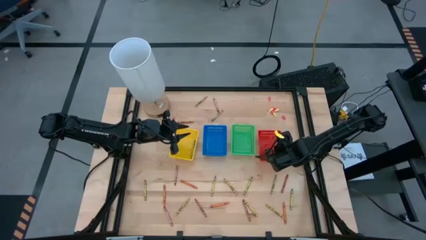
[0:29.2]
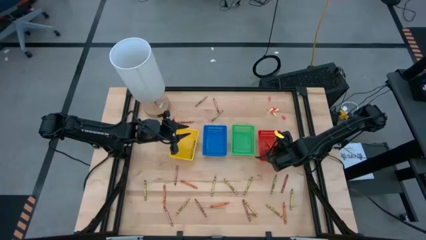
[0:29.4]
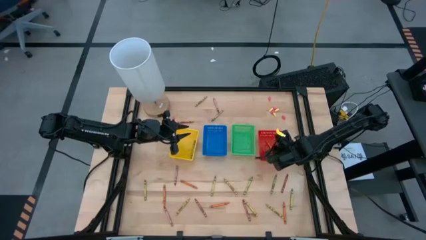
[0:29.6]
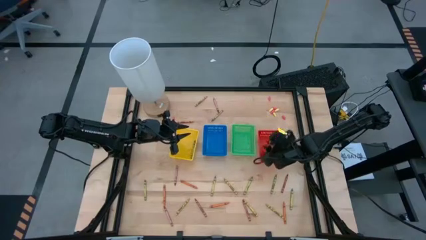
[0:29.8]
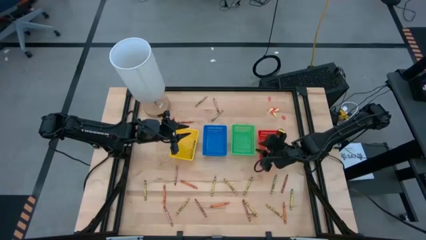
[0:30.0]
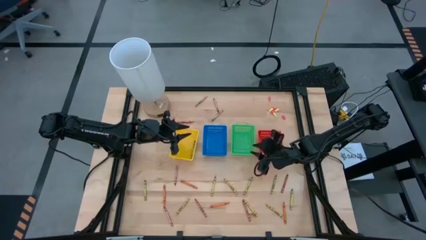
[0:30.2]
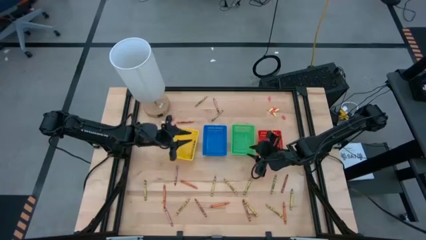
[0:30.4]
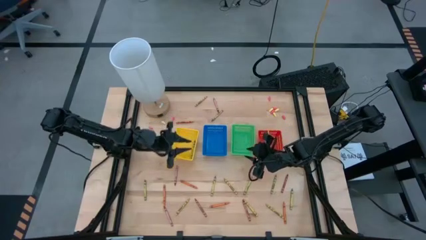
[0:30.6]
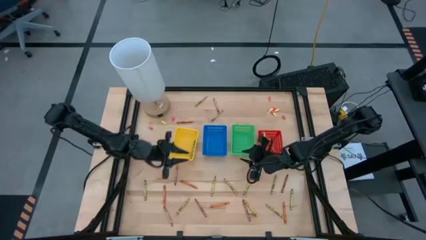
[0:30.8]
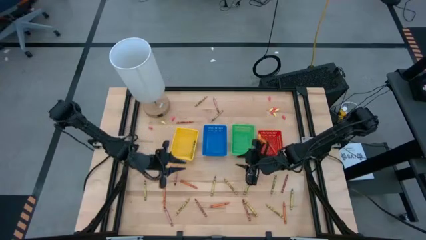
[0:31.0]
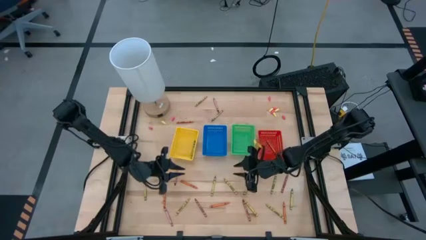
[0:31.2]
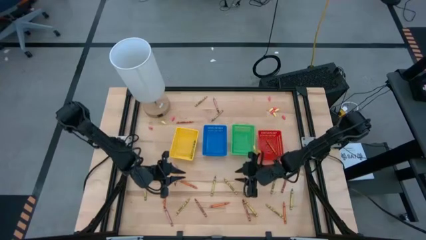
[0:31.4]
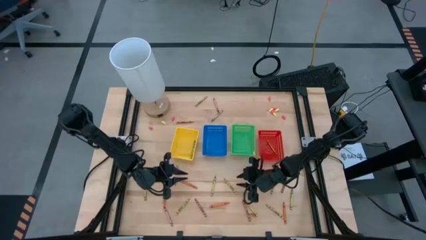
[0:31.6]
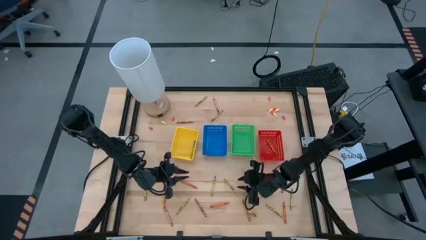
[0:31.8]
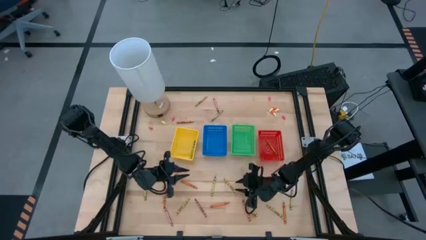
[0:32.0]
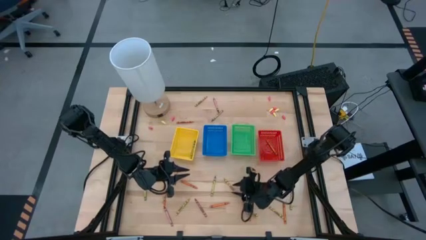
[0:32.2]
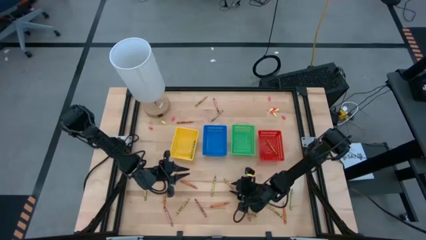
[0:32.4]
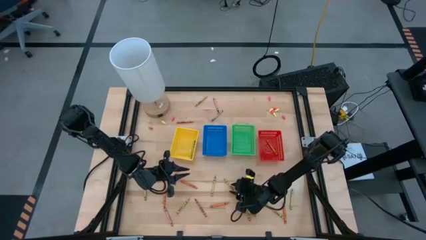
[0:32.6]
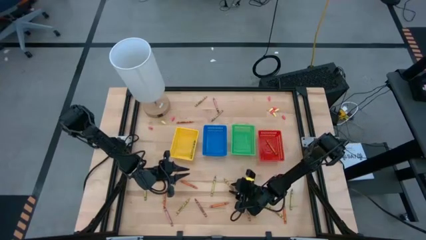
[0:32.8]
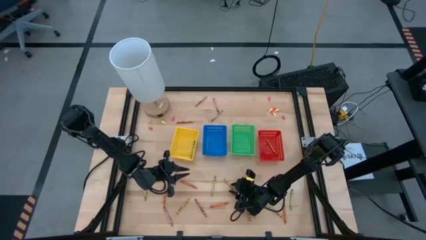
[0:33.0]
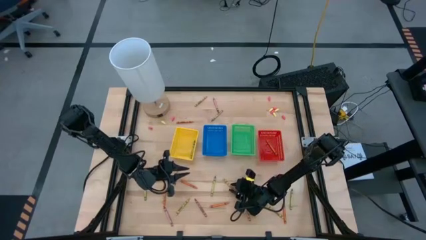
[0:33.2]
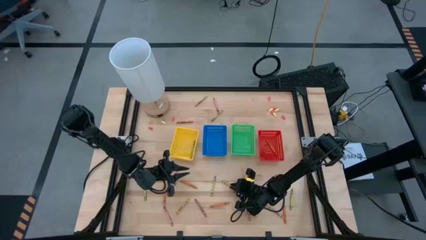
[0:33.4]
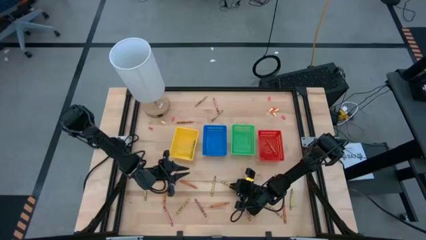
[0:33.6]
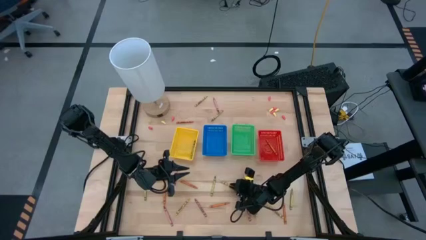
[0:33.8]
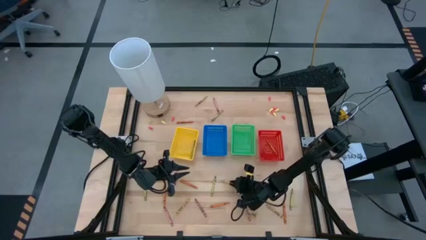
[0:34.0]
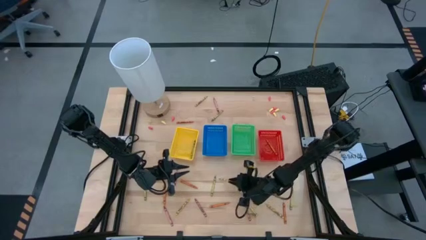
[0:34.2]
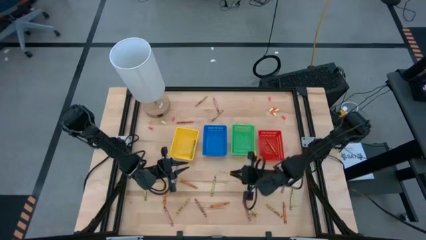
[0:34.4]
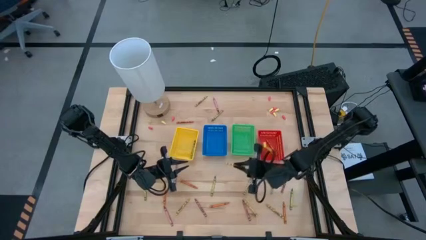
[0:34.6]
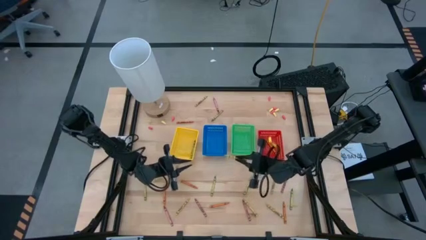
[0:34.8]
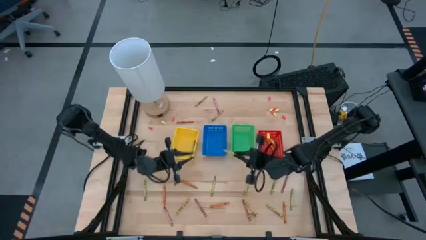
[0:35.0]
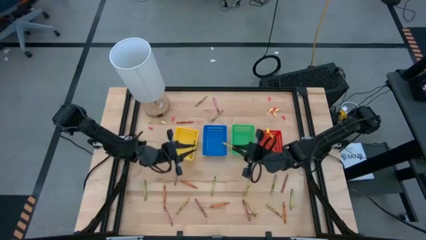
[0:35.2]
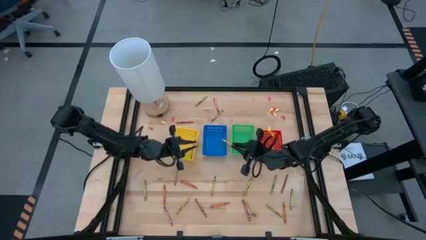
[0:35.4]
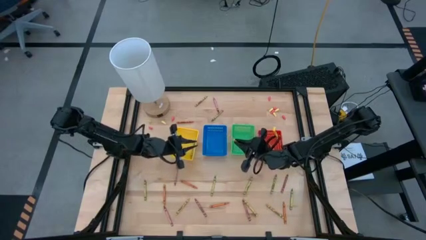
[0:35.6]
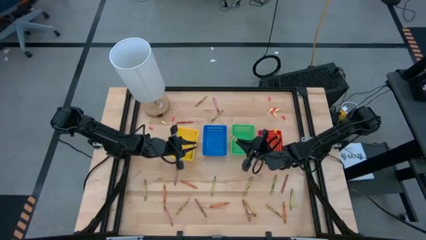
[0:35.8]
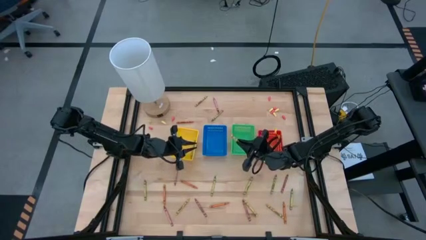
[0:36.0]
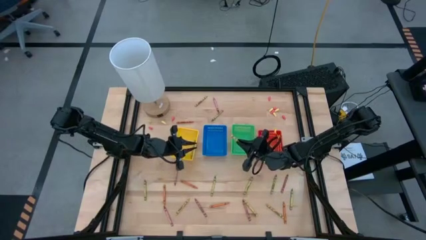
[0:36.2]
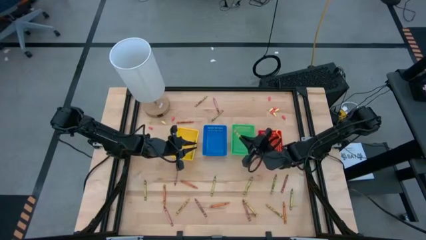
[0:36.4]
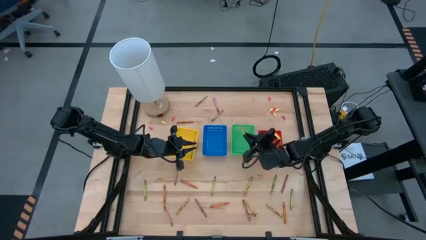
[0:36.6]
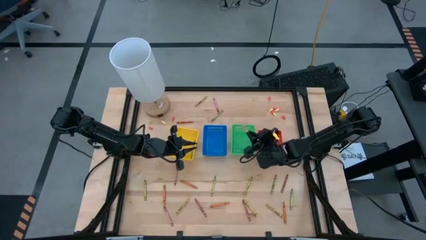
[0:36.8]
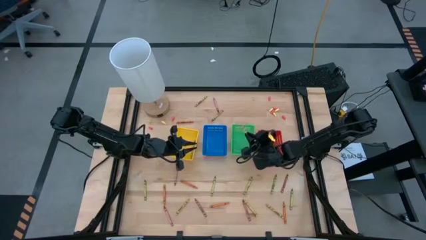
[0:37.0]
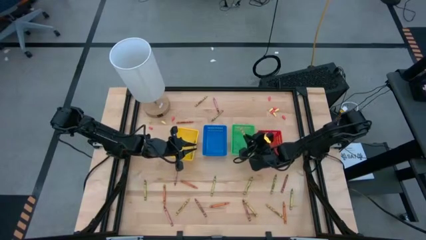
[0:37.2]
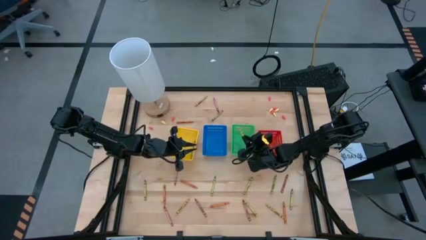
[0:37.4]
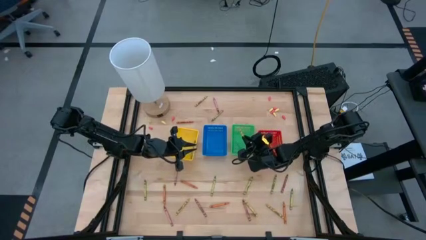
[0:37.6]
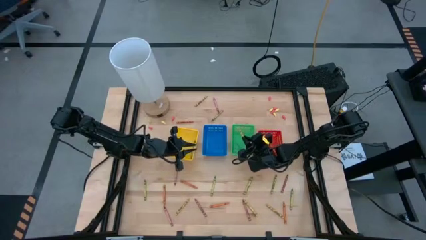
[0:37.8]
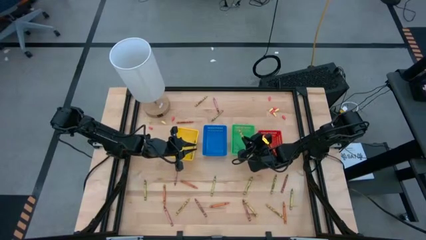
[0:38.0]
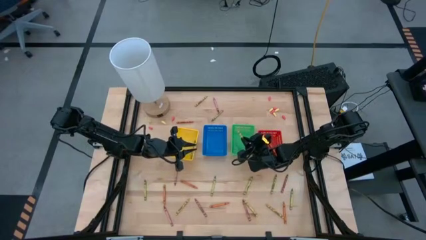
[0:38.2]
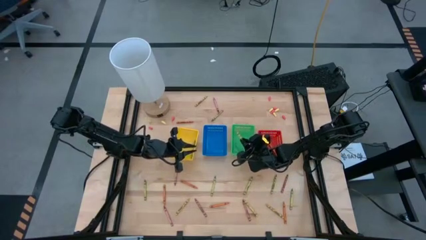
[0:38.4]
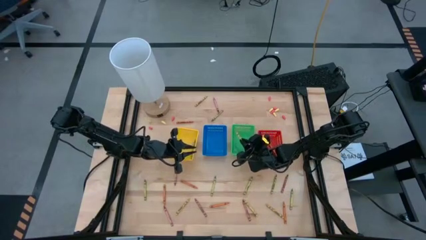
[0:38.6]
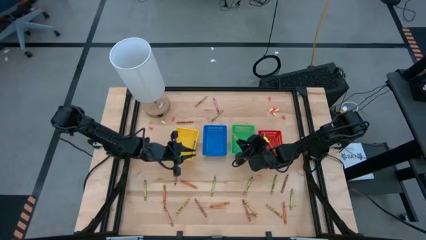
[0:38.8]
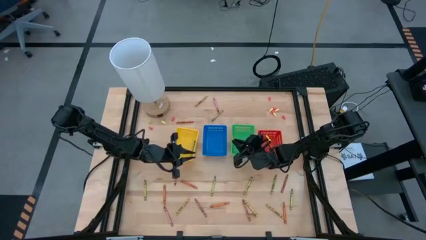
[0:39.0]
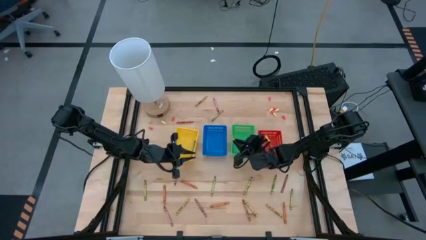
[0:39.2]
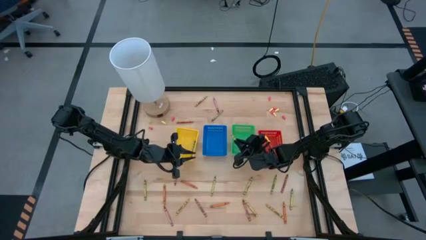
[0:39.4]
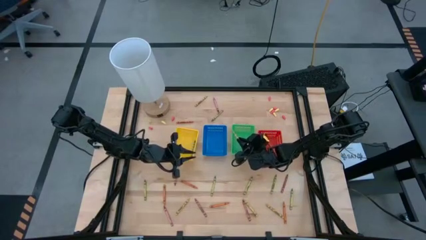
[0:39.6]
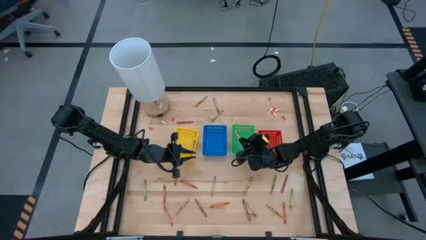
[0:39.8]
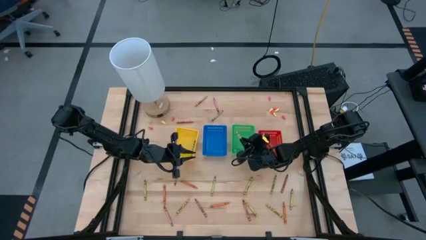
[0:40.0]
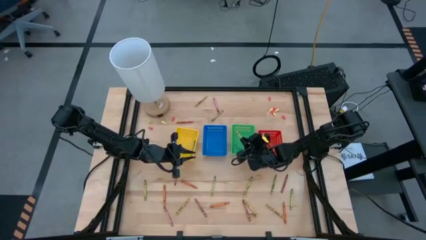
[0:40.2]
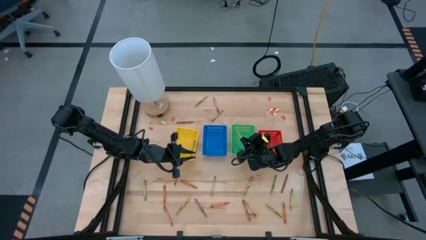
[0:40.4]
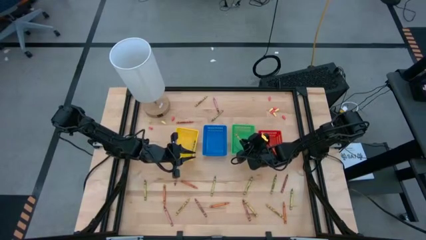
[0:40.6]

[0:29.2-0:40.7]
Task: Sort crayons
Put the yellow crayon into the green bin

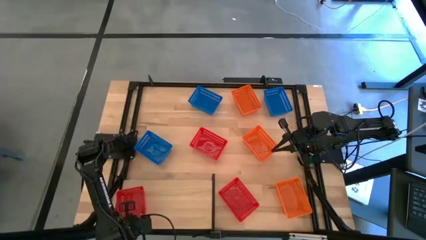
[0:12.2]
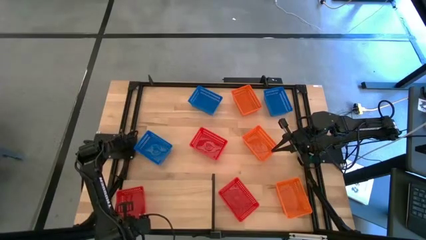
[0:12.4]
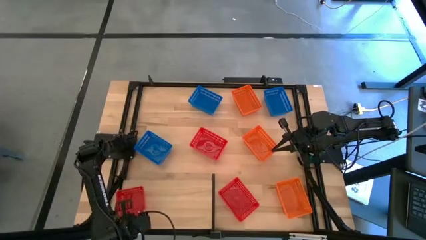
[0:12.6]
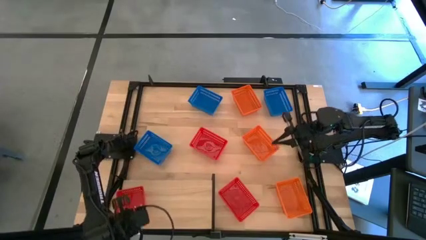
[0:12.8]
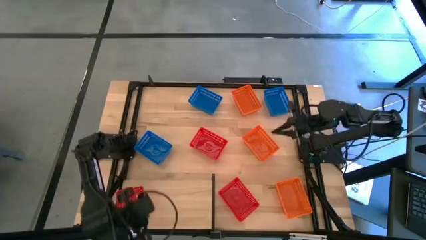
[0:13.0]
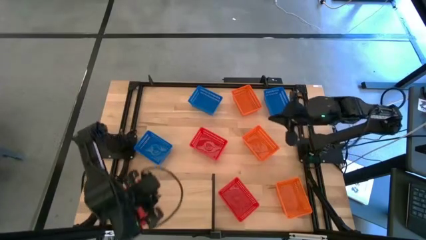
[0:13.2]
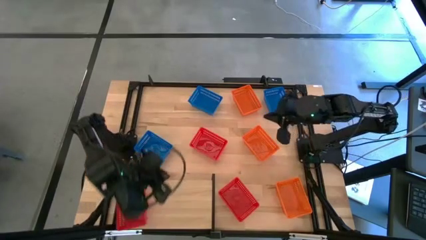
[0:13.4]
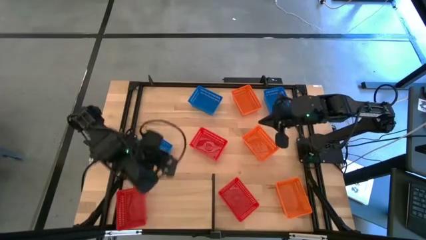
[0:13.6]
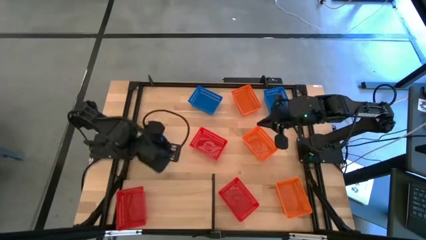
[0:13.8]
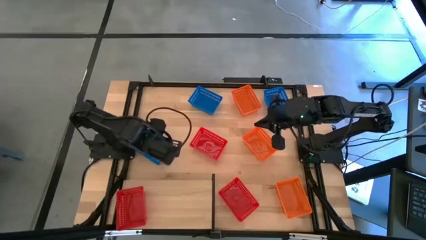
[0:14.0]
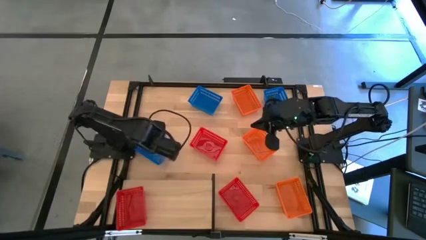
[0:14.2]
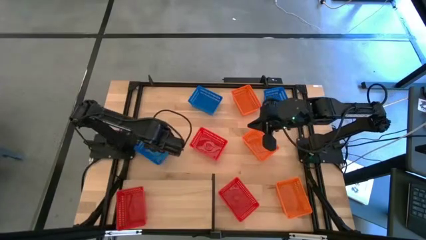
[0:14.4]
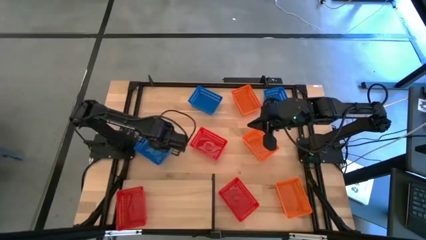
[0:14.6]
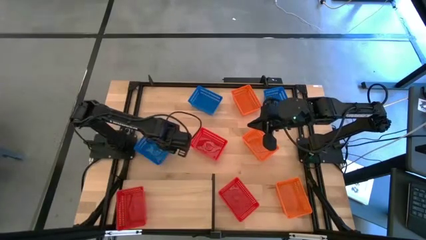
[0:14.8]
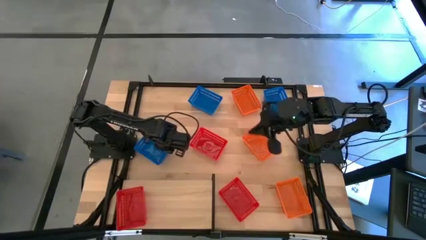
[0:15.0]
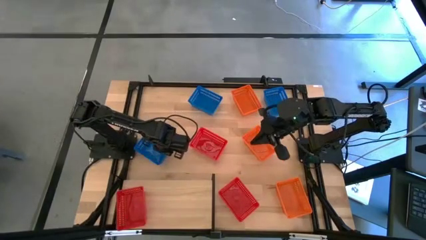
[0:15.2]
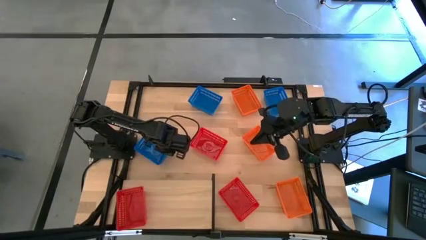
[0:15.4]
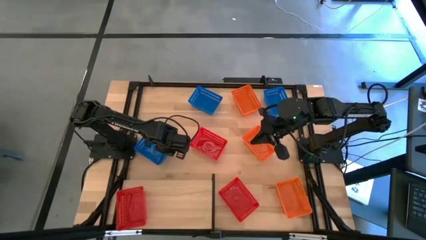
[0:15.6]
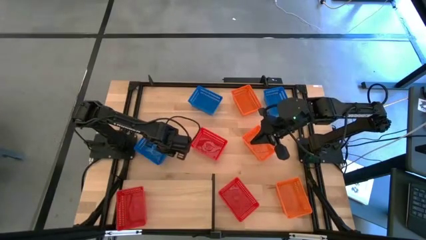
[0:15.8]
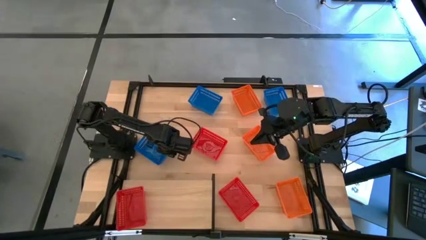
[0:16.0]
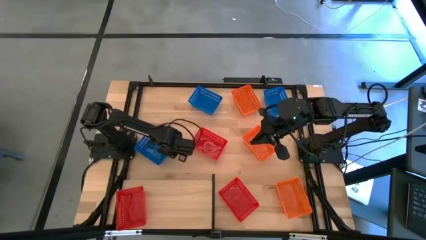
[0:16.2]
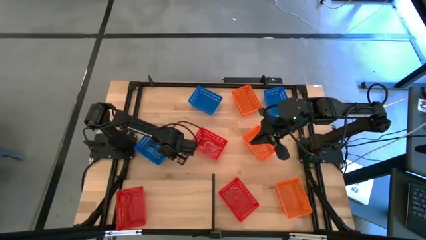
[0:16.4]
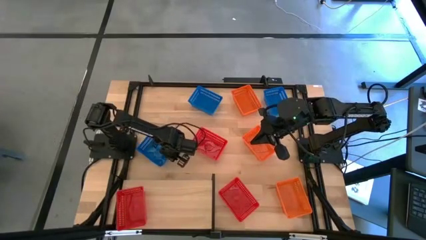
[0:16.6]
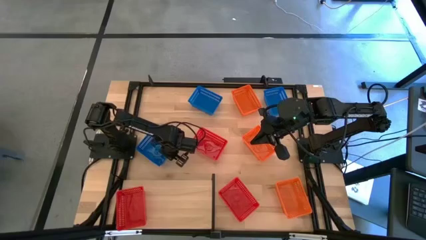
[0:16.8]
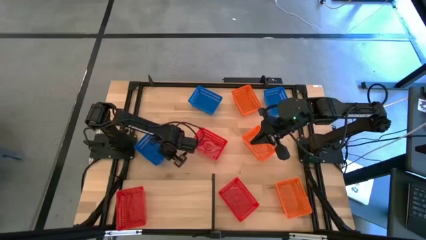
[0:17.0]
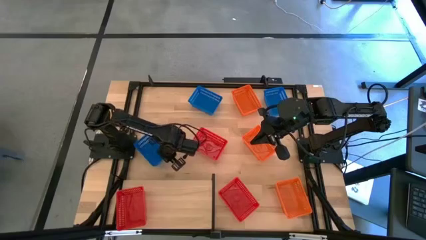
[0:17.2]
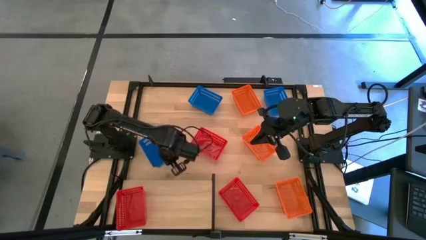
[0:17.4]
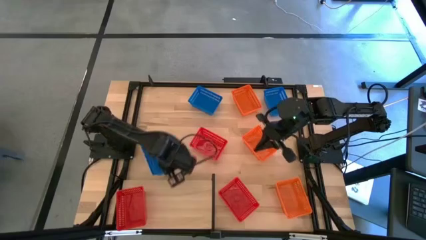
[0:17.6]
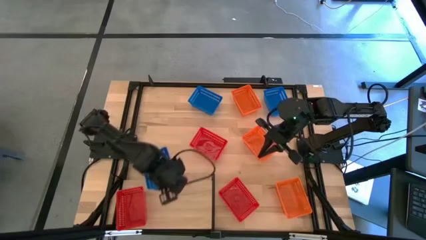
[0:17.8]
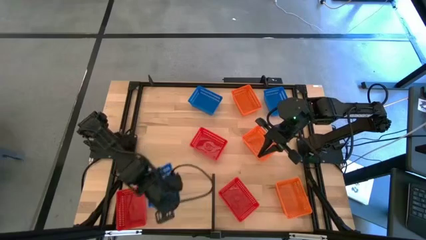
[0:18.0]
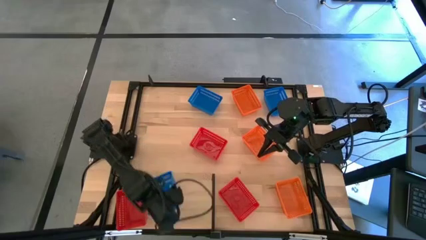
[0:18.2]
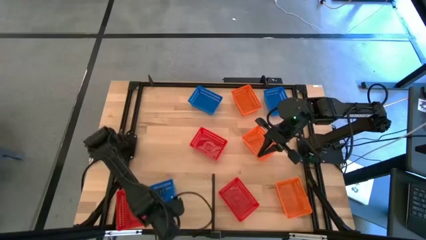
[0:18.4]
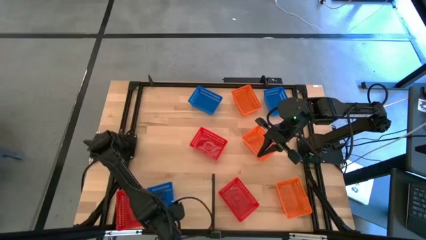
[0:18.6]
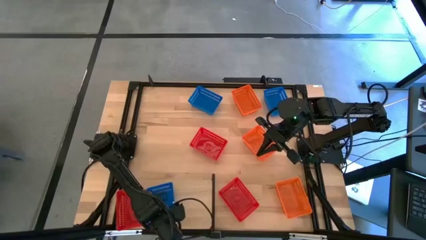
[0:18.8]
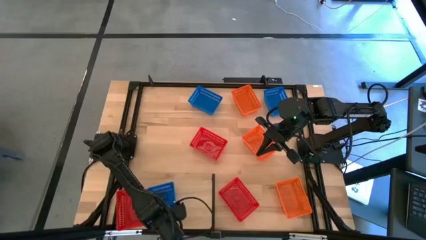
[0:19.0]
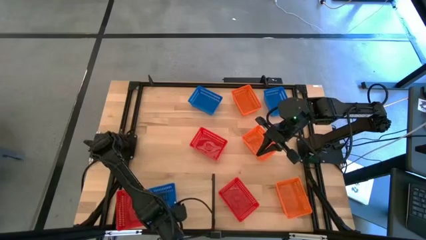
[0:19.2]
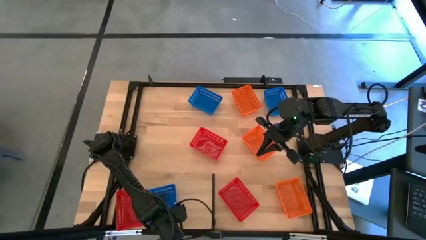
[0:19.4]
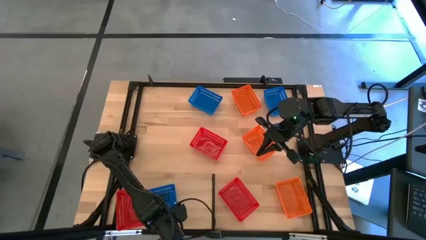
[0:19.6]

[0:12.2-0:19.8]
Task: Stack baskets on shelf by color
Put the bottom blue bin on the shelf
